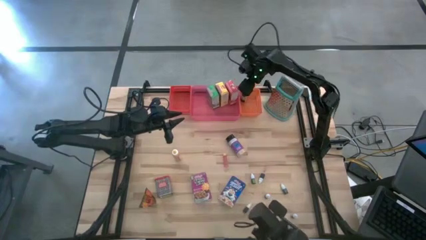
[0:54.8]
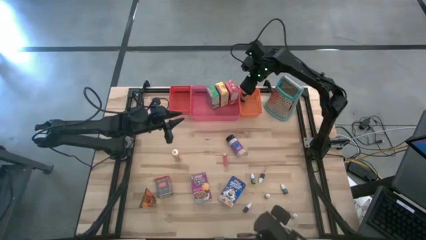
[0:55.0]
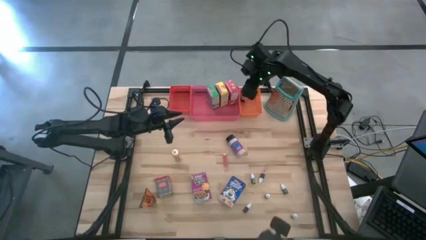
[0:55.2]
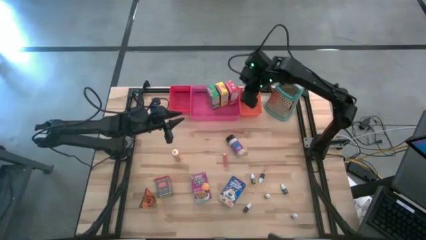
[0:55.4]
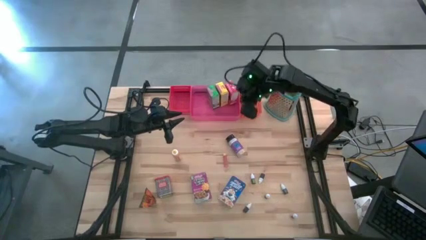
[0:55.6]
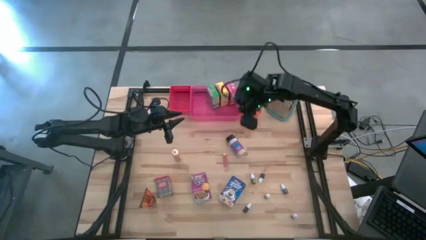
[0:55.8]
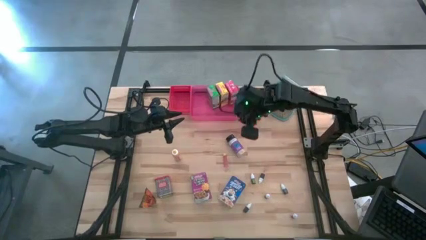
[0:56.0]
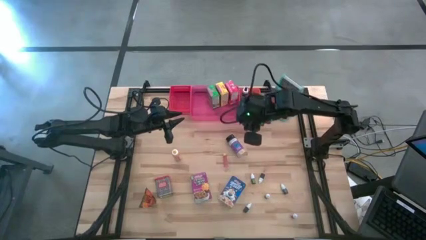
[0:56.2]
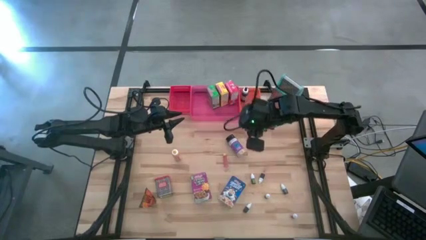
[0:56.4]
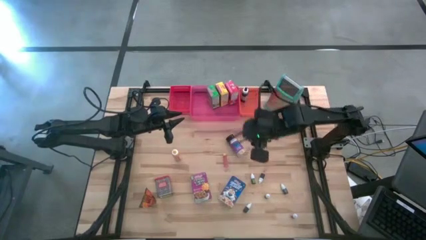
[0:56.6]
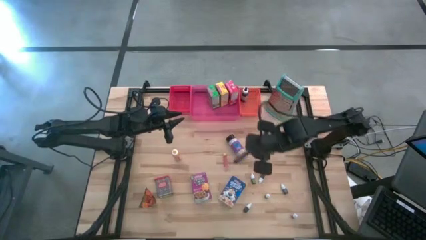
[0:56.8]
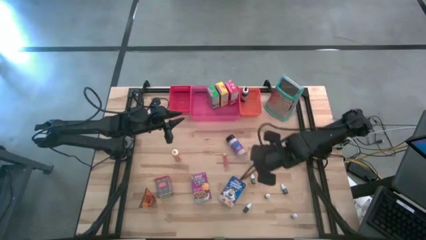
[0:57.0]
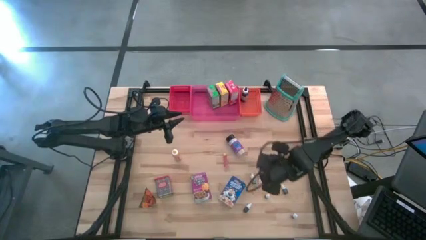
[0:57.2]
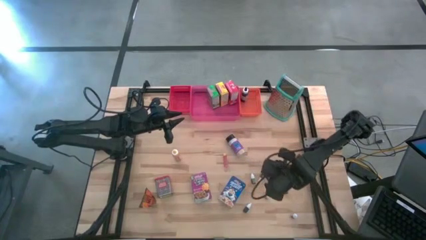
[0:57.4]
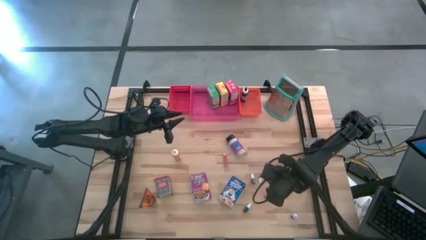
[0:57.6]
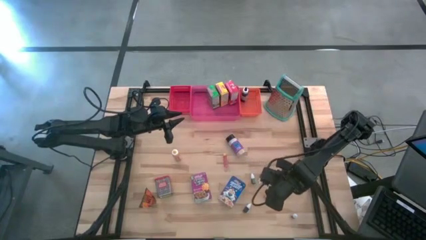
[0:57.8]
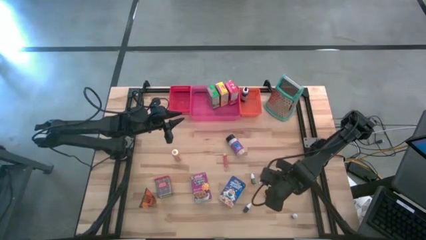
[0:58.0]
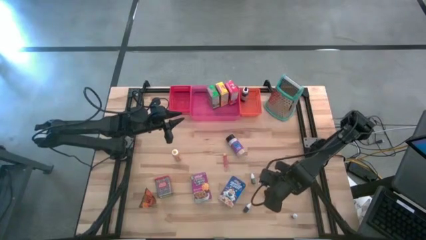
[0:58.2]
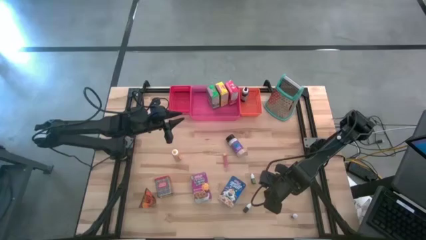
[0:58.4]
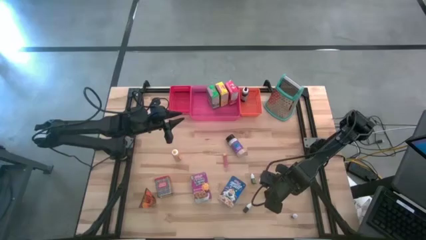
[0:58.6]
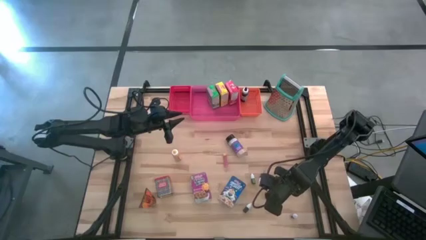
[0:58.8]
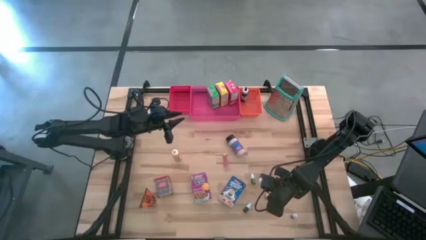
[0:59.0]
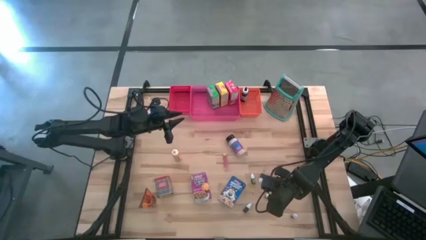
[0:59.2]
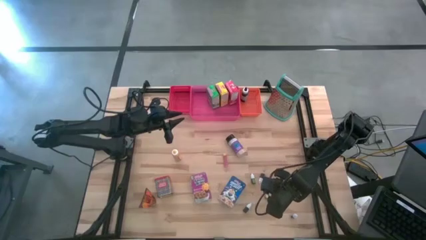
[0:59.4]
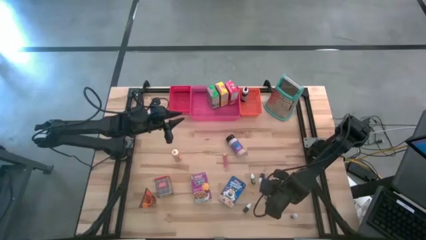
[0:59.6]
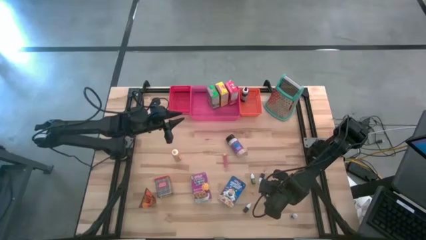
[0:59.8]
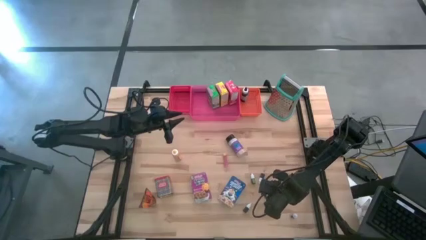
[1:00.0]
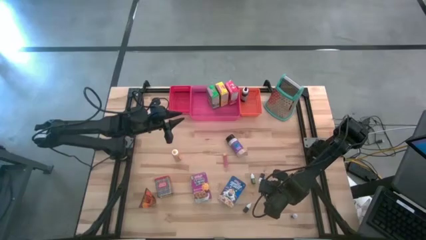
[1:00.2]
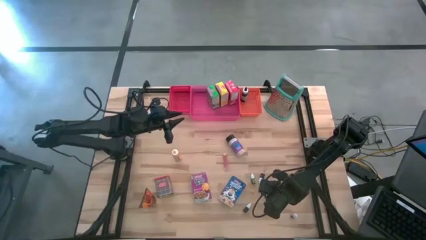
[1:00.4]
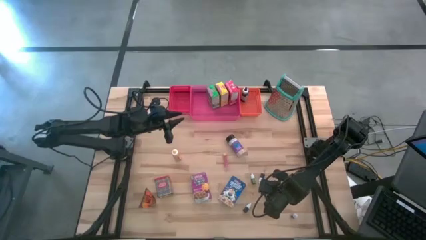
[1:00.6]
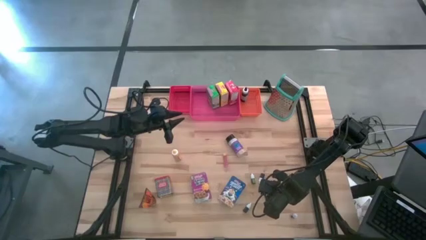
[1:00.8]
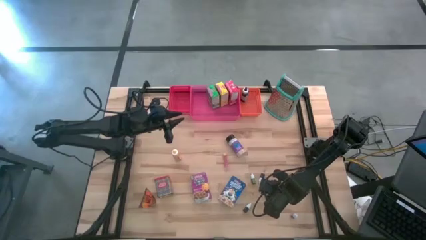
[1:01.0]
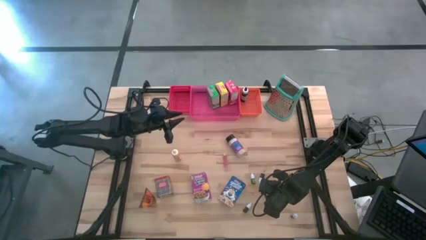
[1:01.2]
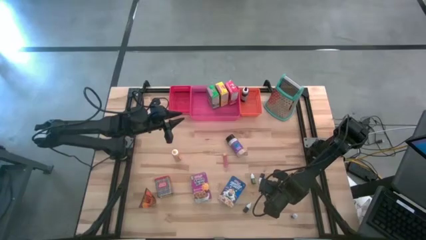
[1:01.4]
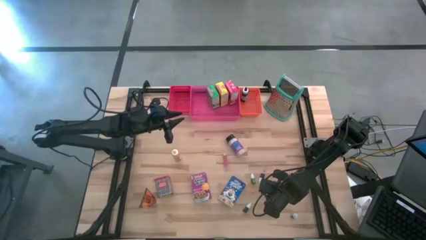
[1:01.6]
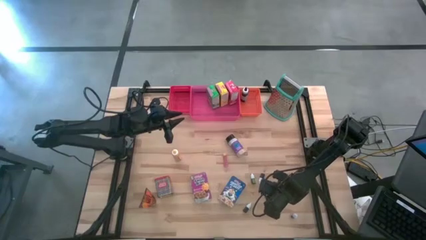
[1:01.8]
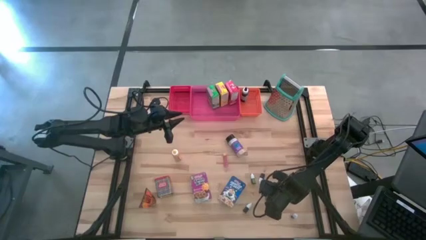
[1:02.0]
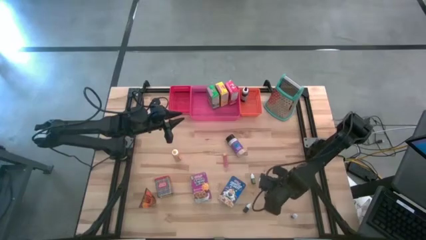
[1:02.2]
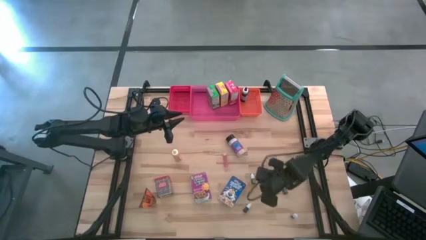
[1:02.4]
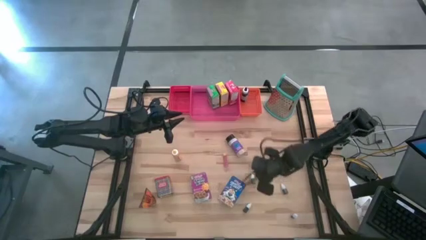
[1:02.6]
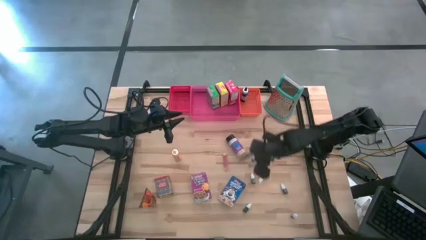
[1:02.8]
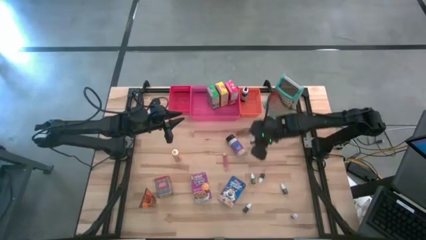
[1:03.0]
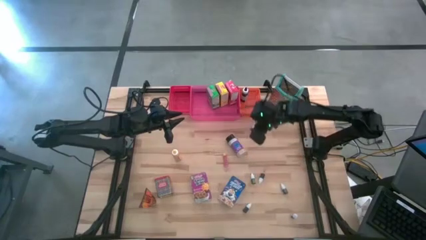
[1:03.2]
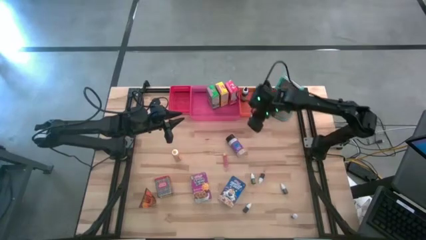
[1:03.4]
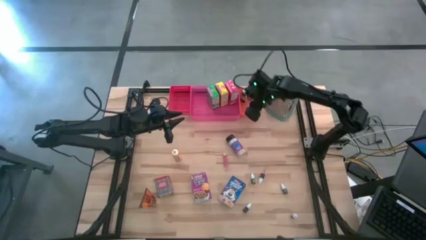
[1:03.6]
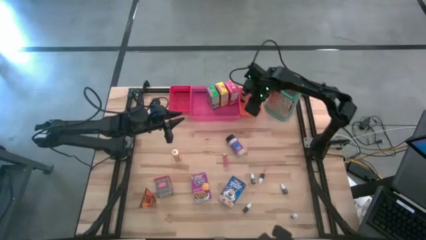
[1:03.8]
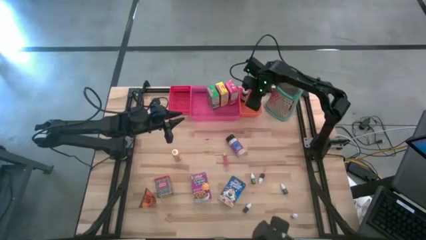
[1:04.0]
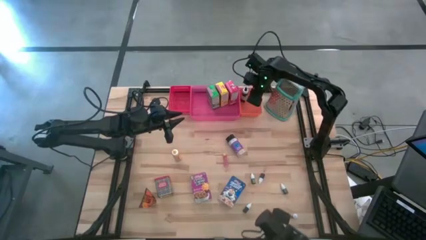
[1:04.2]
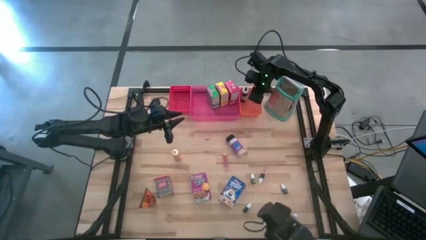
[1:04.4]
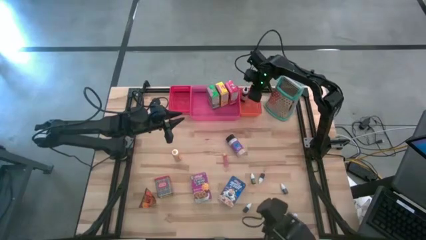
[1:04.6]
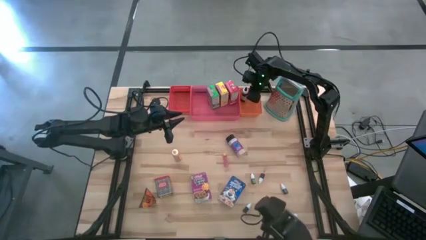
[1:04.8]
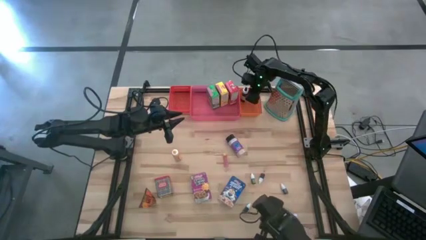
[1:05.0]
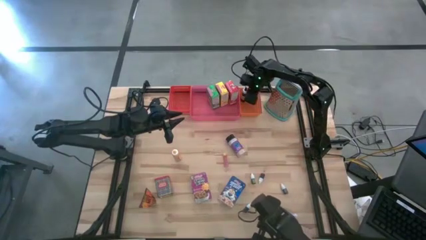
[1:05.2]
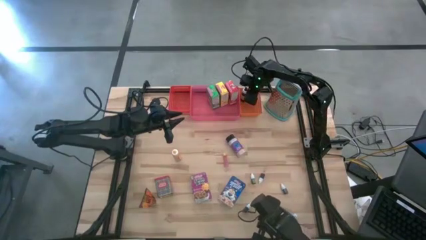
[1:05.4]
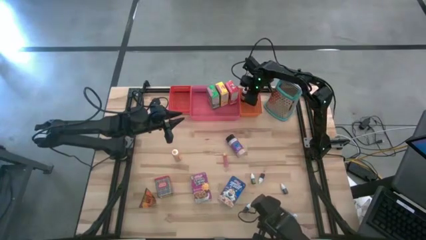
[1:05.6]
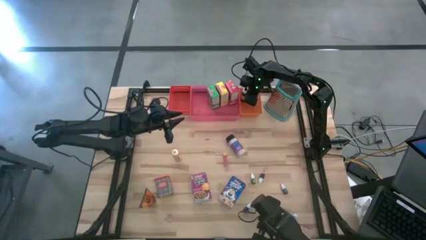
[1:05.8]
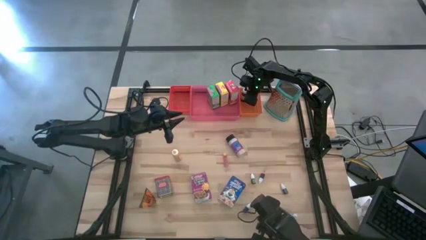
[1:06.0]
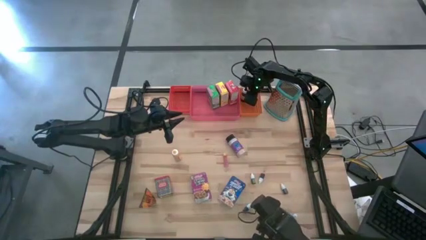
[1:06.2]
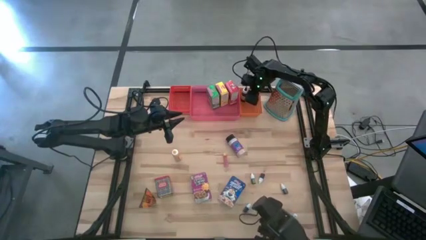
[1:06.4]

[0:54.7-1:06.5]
Task: Pick & Place Kitchen Items
Put the top small black food coloring bottle into the orange bin
